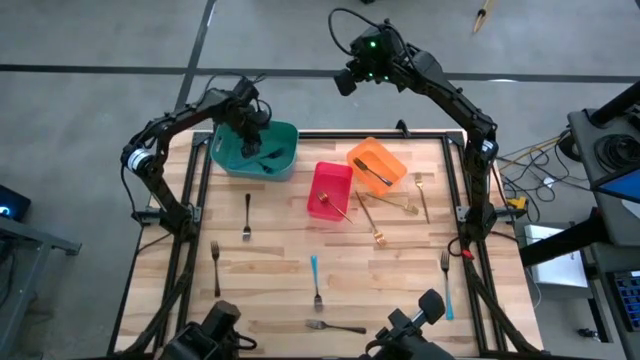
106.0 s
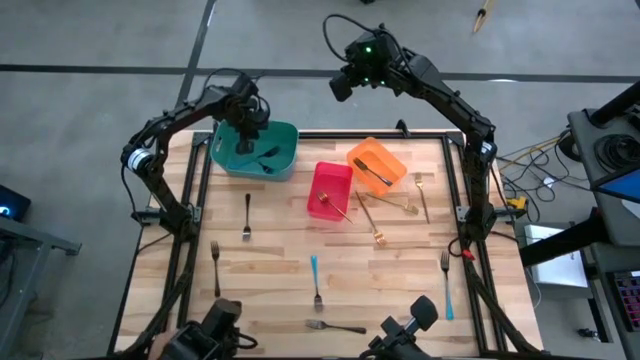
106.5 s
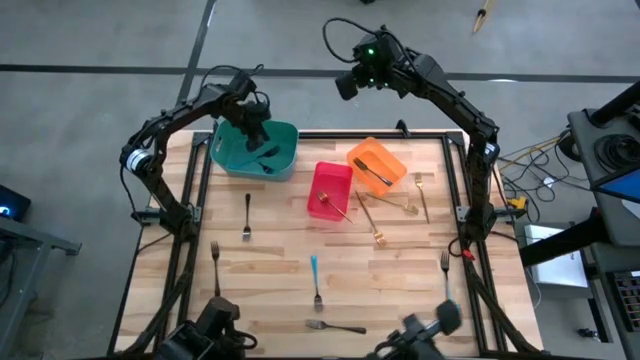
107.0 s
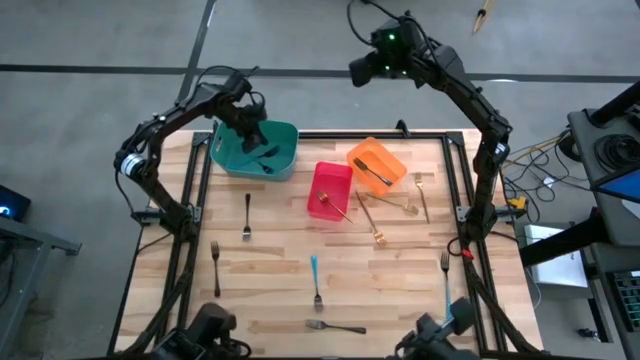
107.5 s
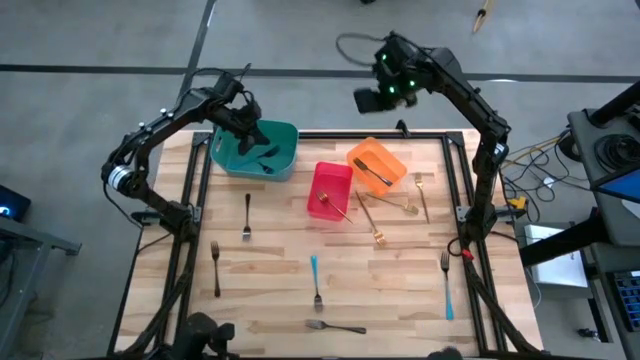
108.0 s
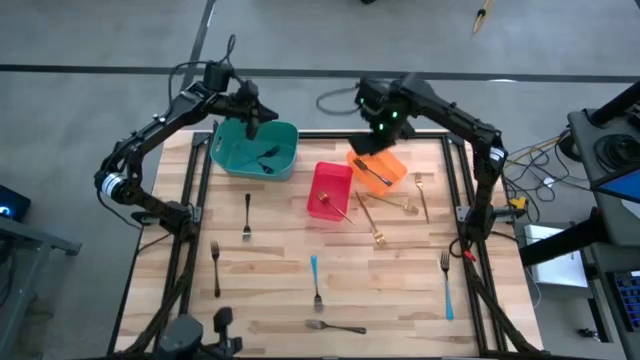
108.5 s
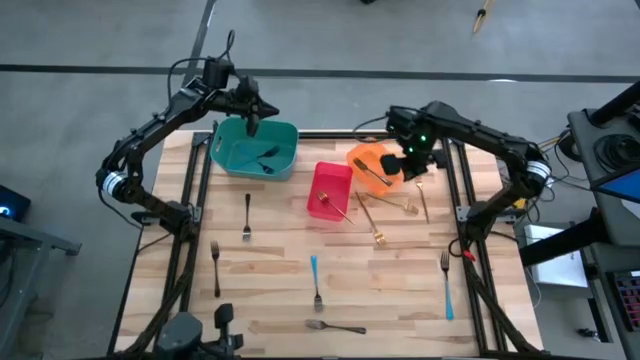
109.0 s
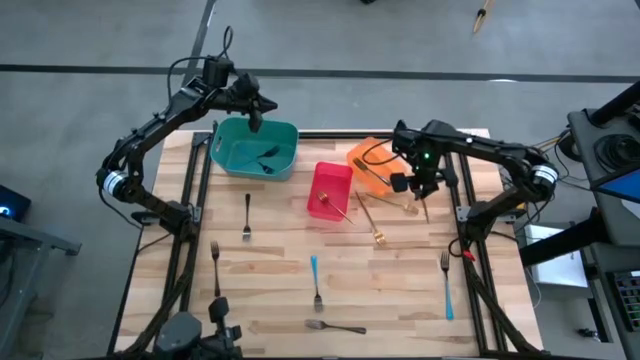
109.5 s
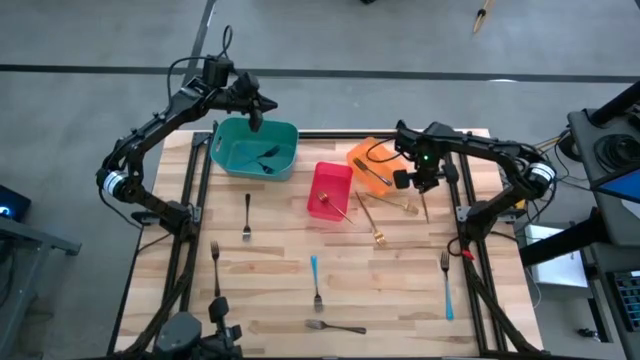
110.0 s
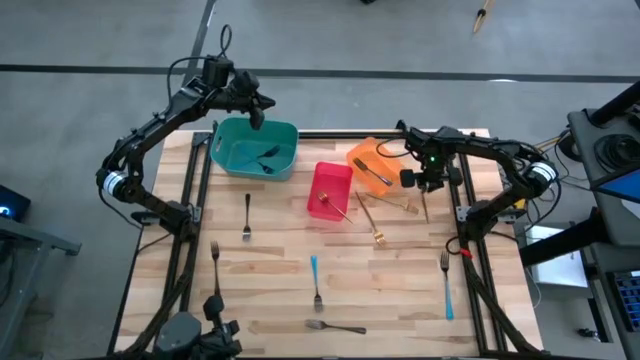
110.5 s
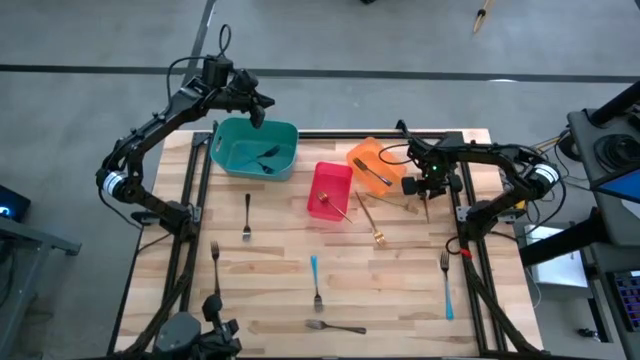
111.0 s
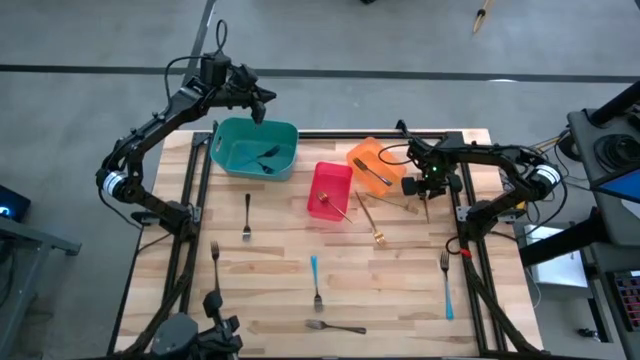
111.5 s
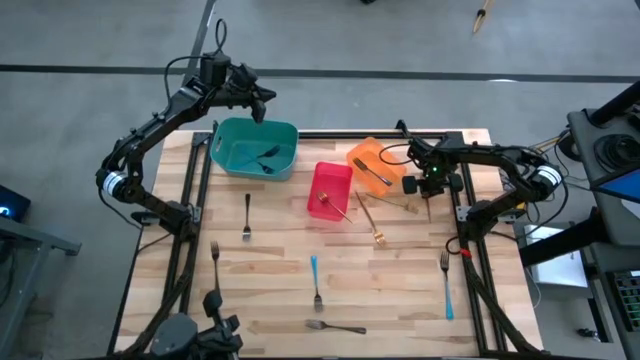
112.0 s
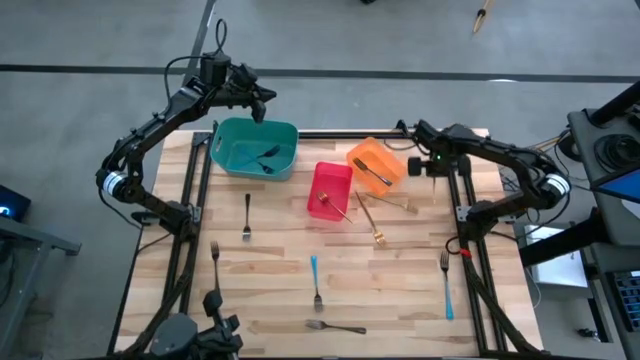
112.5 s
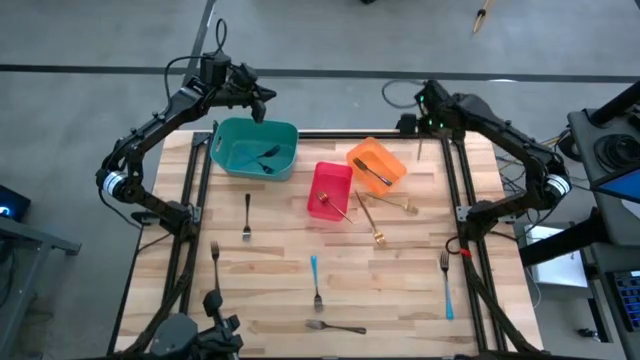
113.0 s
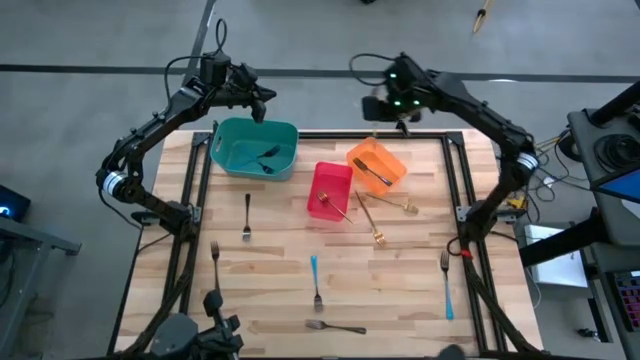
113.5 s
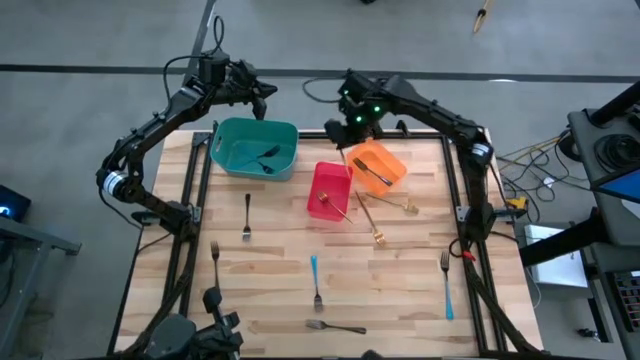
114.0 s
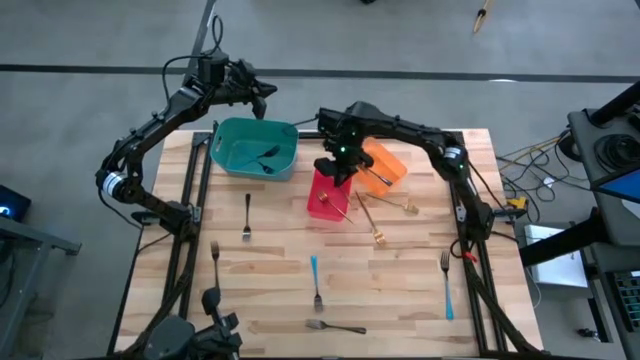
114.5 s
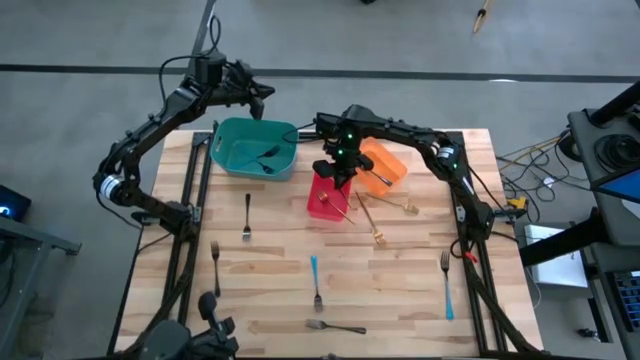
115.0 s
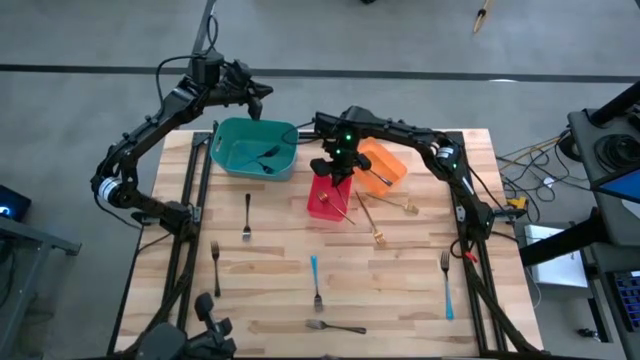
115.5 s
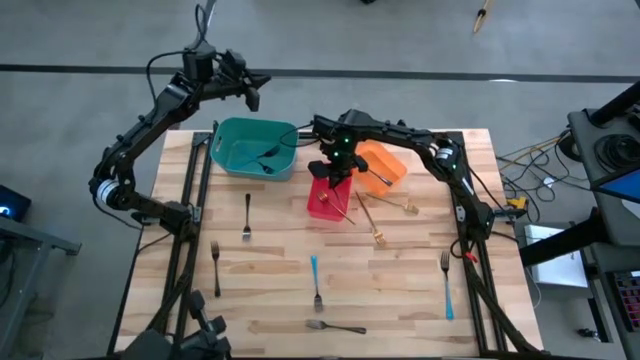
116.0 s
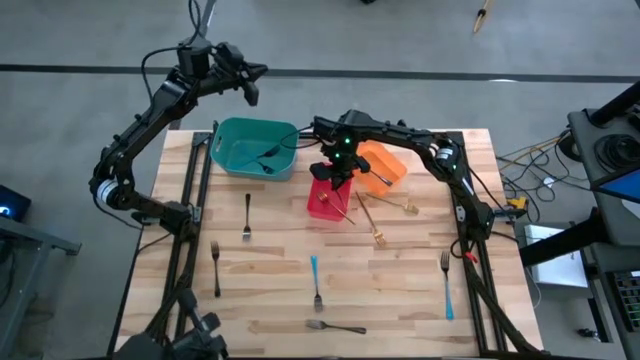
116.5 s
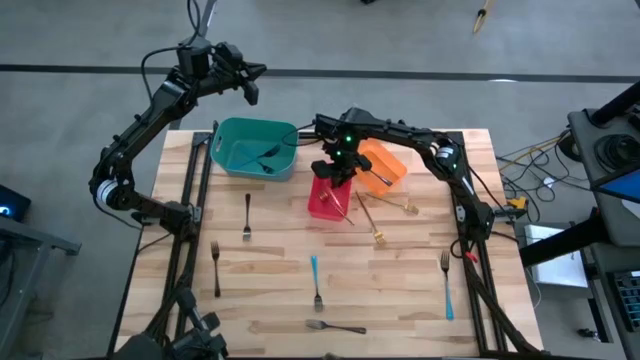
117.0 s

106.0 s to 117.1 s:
Task: Sort silverware by color (type)
Put the golden fork into the red bin

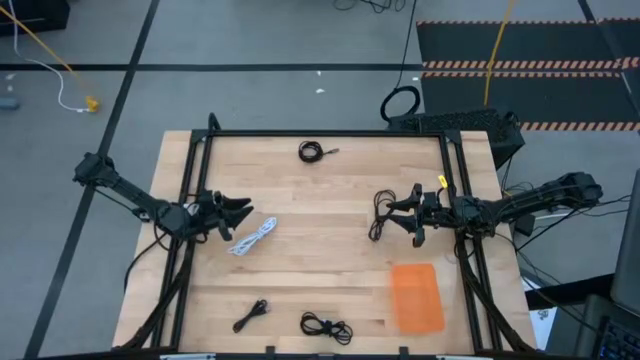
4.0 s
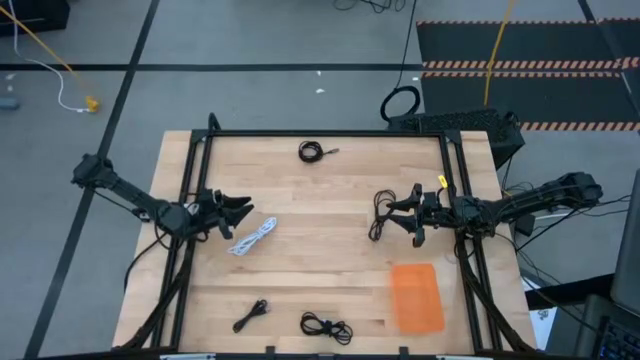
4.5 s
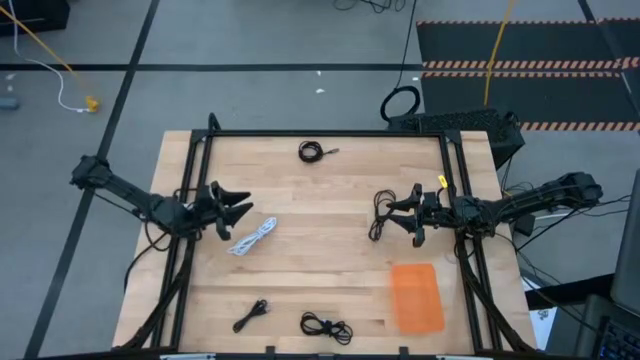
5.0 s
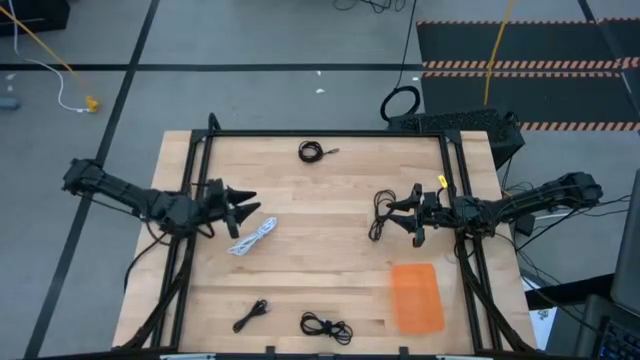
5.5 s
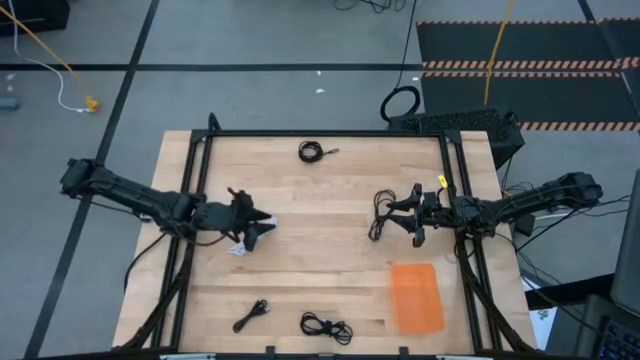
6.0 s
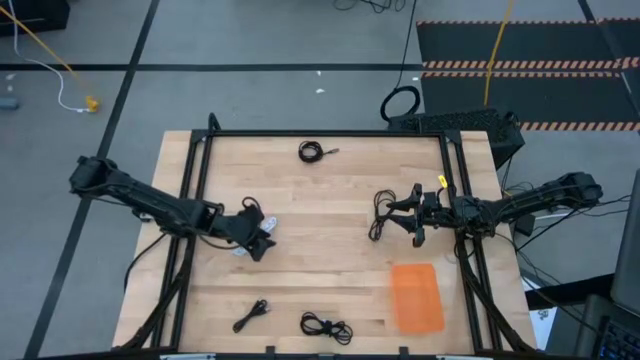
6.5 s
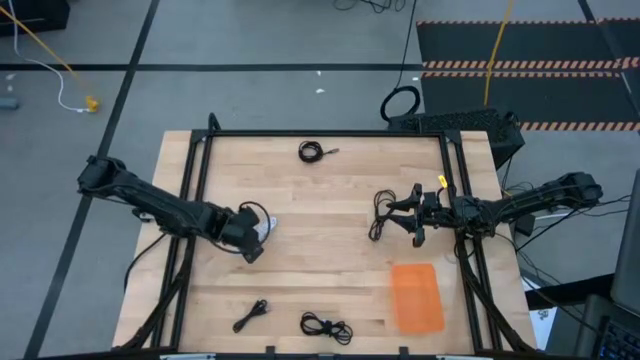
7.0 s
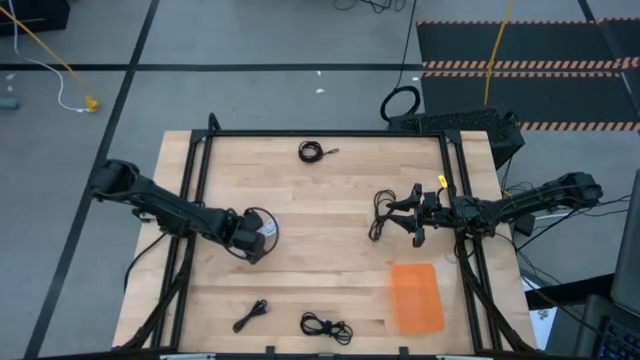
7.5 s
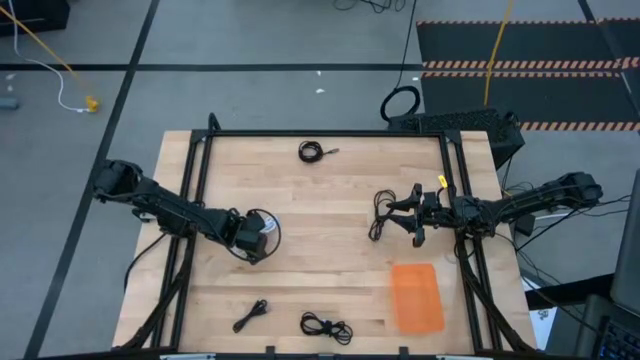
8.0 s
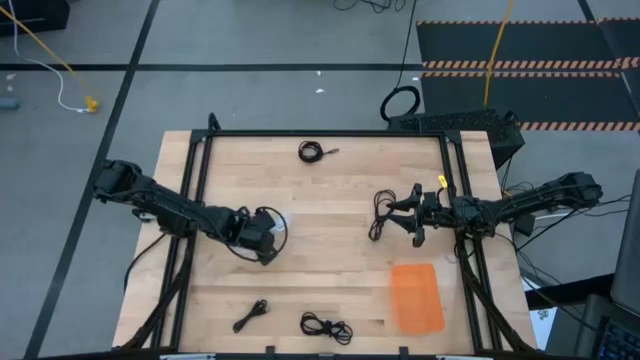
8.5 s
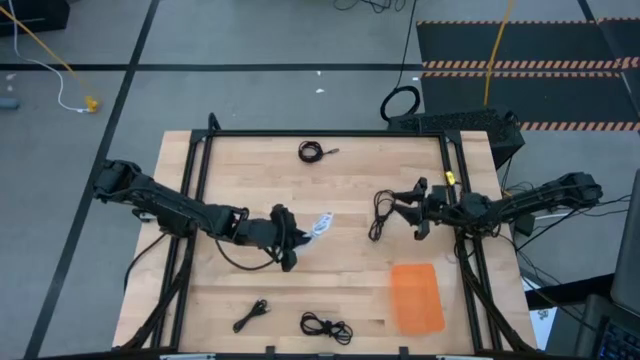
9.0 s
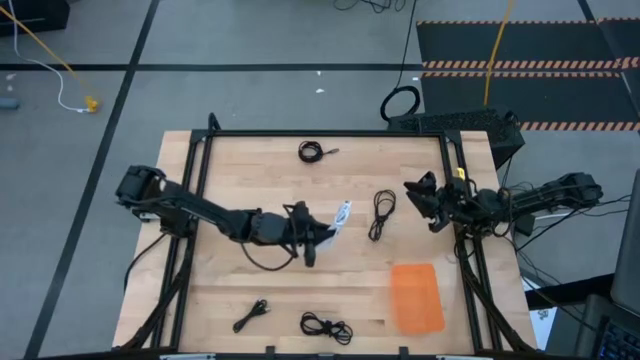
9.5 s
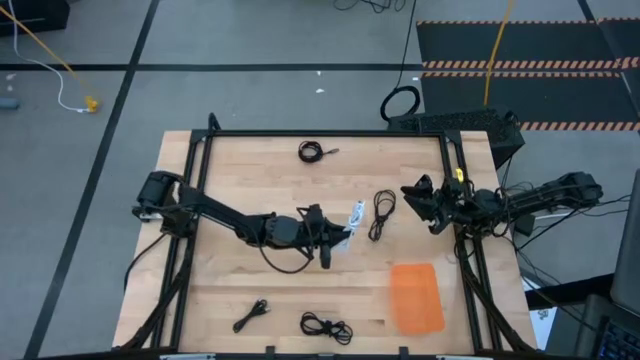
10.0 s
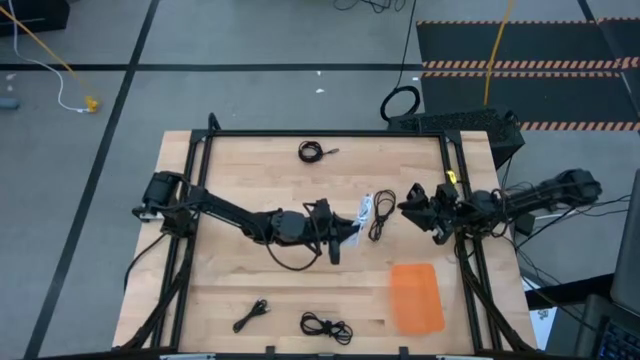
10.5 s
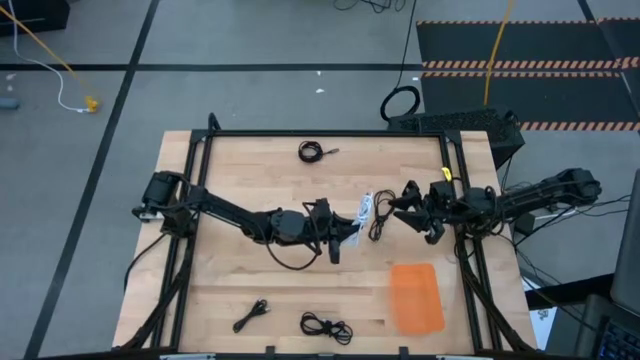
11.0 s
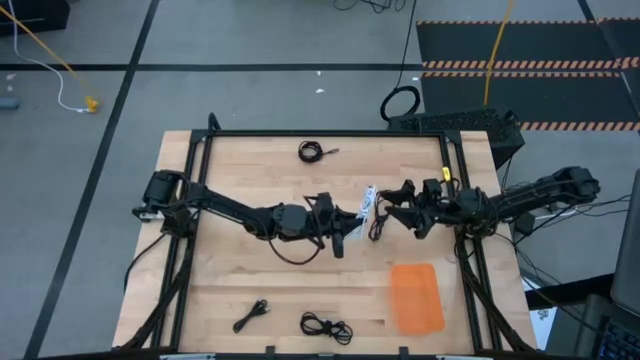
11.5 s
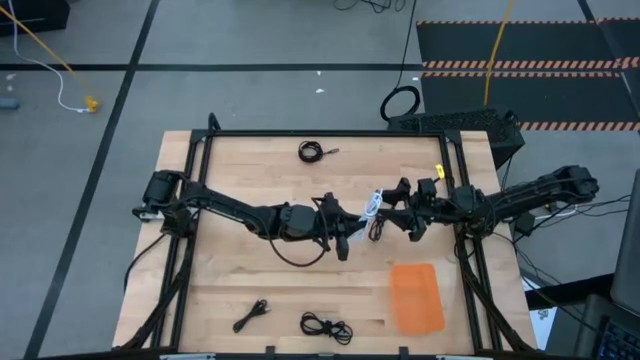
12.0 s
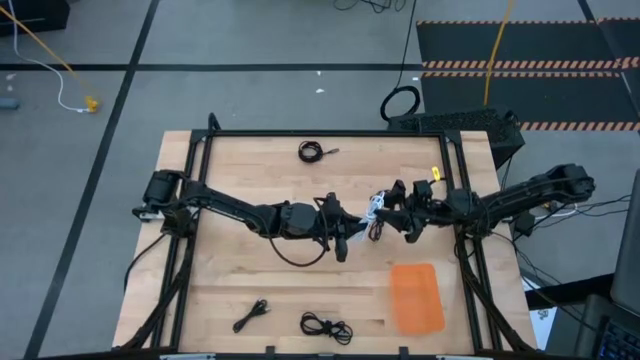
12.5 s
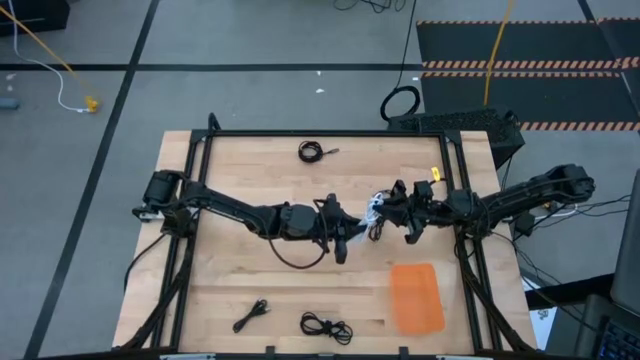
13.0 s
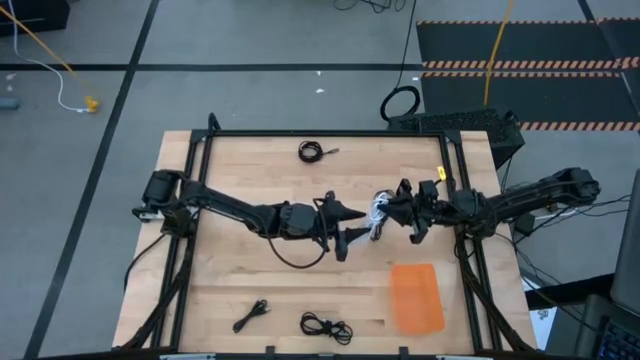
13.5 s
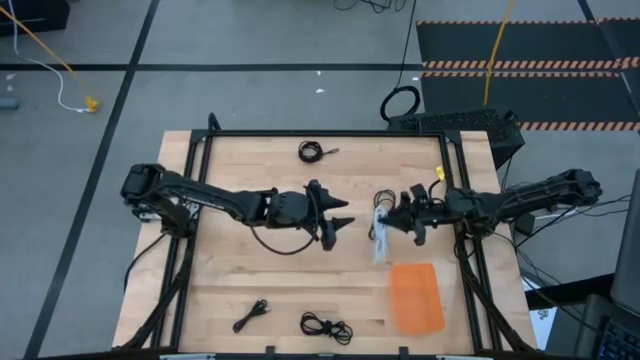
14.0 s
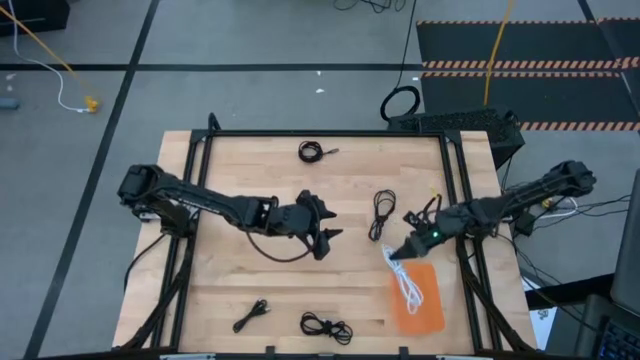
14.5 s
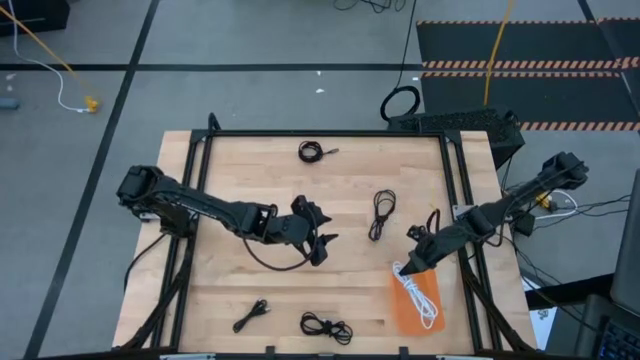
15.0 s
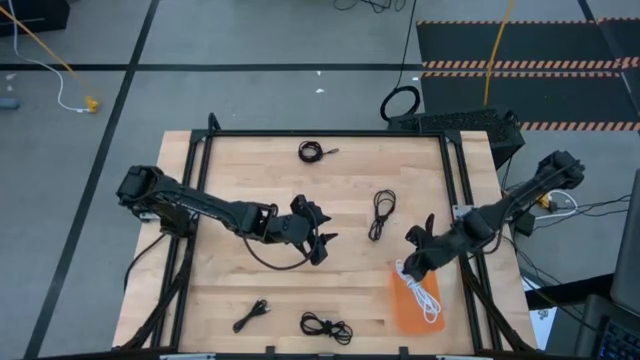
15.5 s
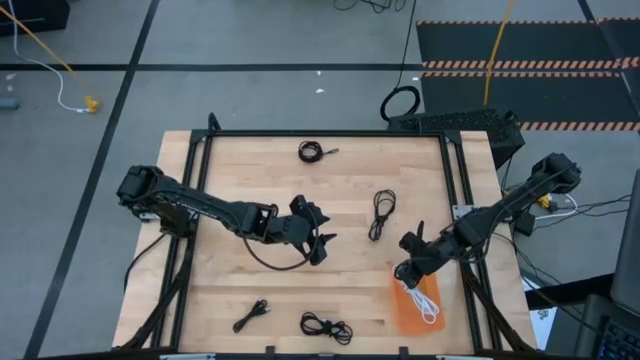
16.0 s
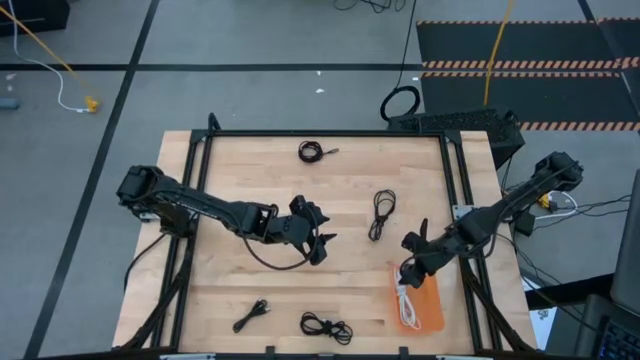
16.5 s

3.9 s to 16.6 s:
Task: Pick and place USB-C Cables
Put the white charger cable into the orange bin
